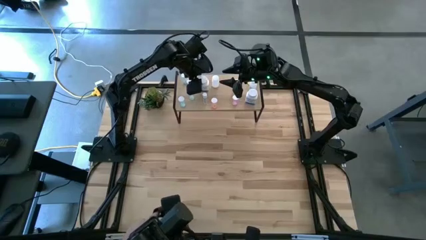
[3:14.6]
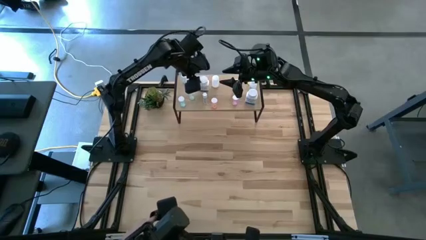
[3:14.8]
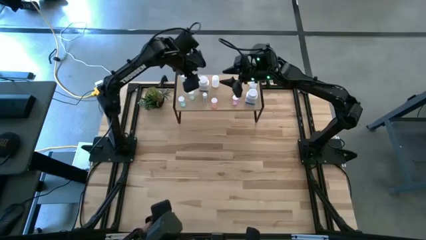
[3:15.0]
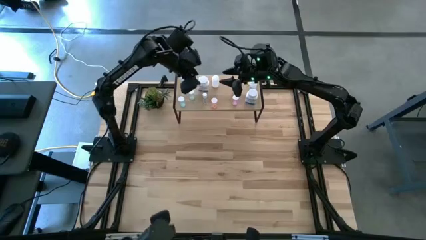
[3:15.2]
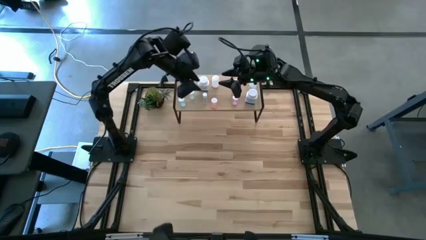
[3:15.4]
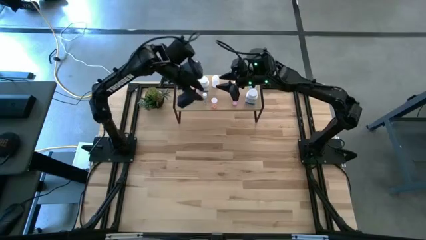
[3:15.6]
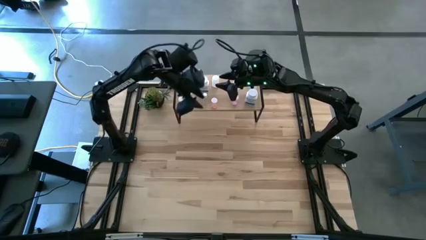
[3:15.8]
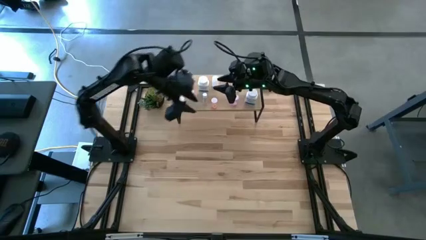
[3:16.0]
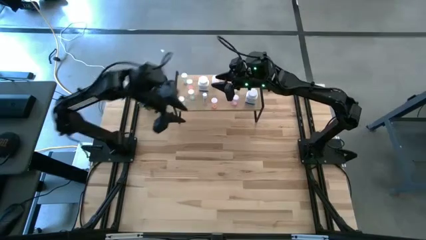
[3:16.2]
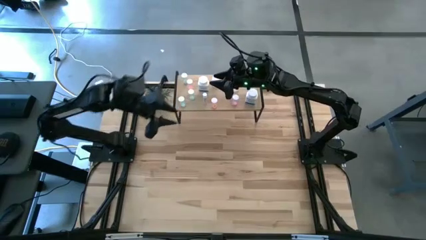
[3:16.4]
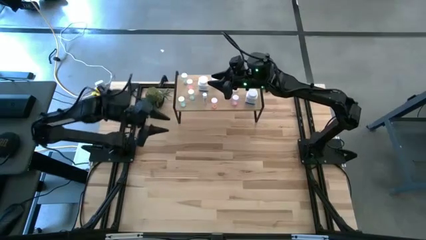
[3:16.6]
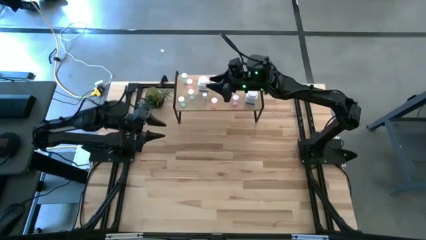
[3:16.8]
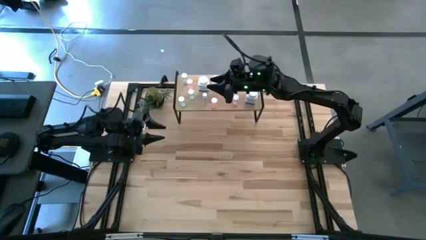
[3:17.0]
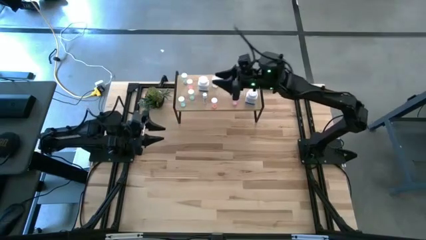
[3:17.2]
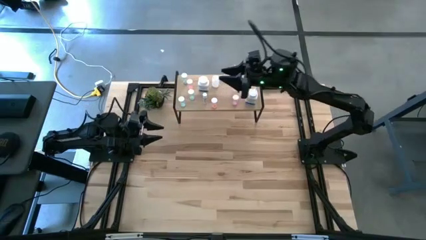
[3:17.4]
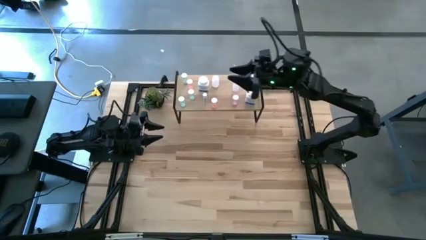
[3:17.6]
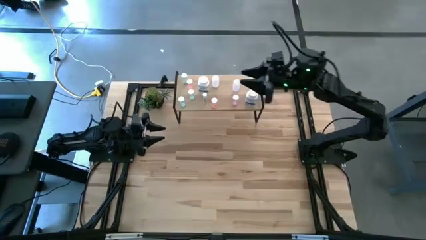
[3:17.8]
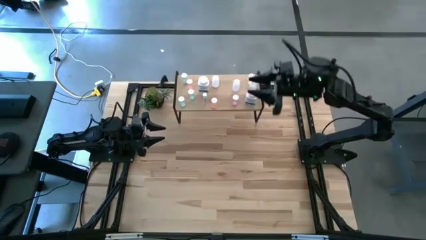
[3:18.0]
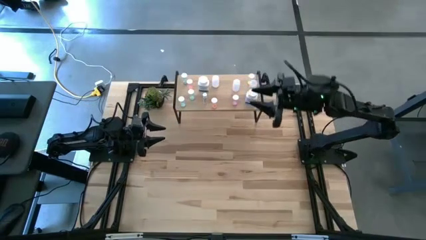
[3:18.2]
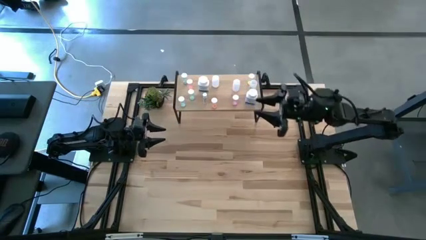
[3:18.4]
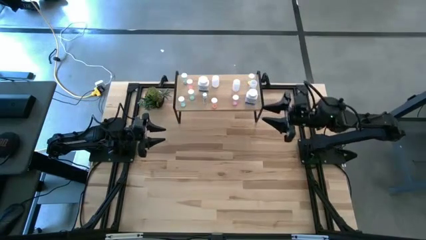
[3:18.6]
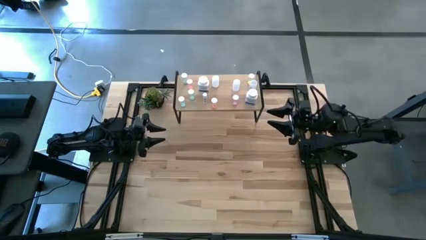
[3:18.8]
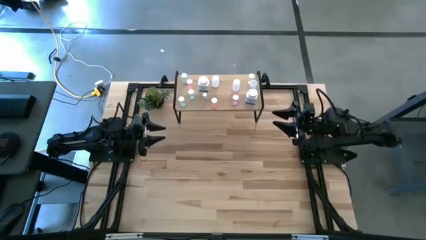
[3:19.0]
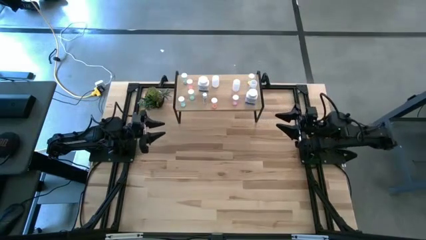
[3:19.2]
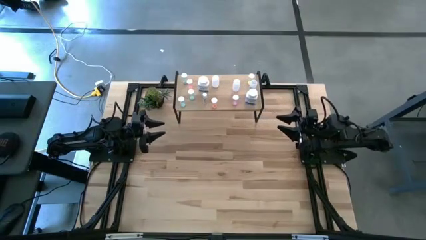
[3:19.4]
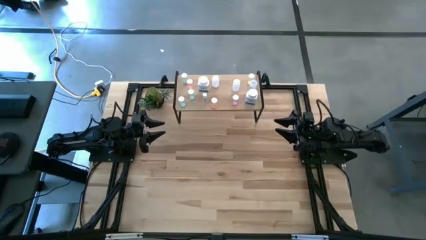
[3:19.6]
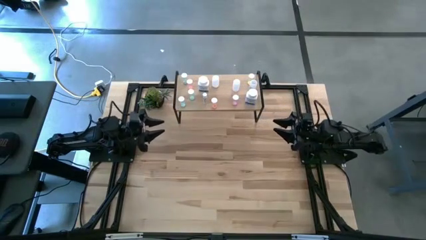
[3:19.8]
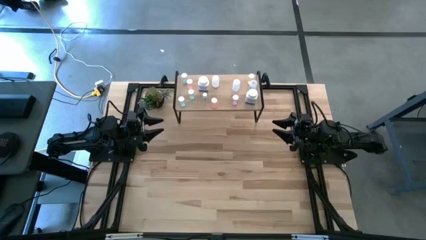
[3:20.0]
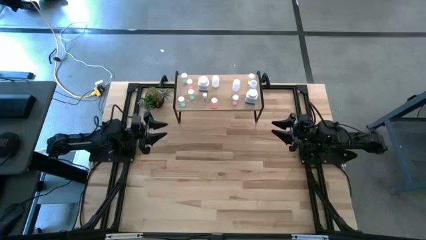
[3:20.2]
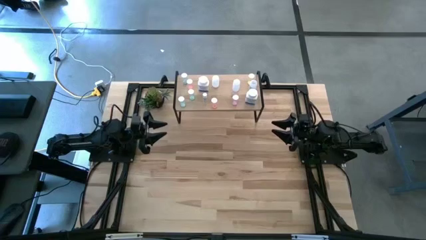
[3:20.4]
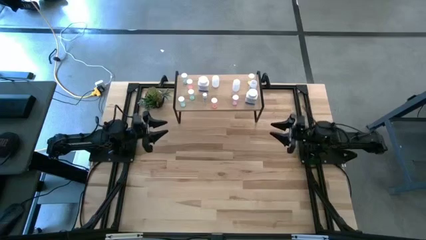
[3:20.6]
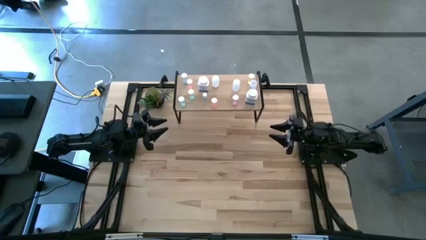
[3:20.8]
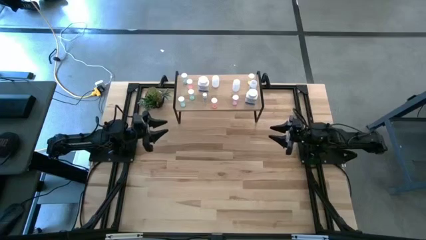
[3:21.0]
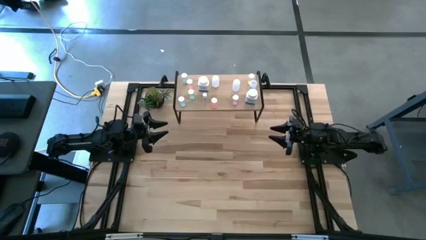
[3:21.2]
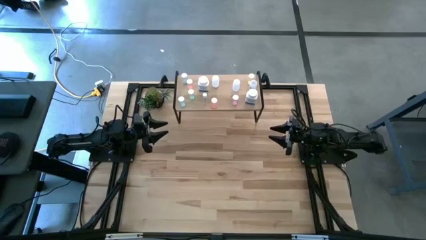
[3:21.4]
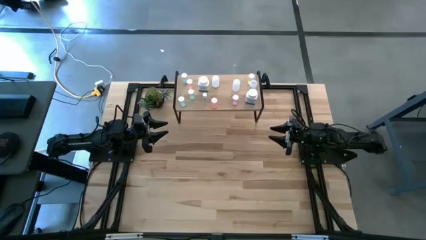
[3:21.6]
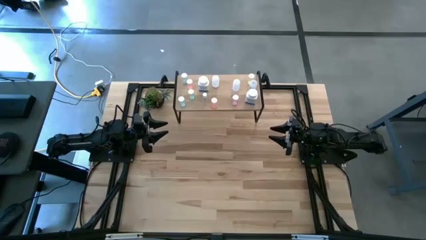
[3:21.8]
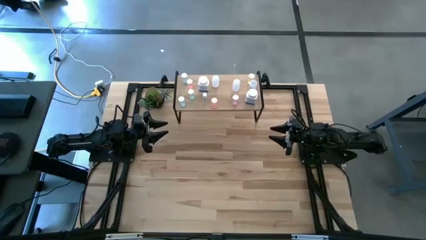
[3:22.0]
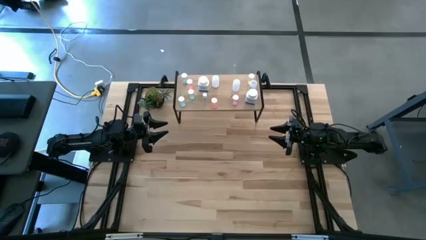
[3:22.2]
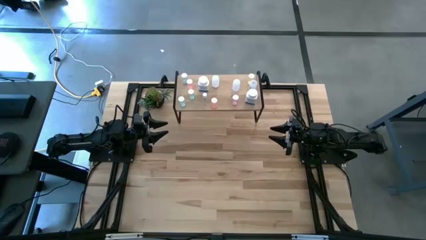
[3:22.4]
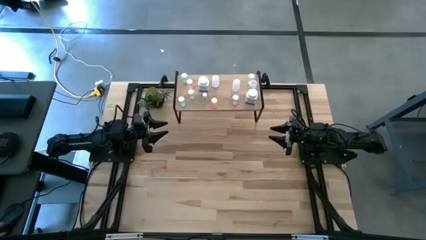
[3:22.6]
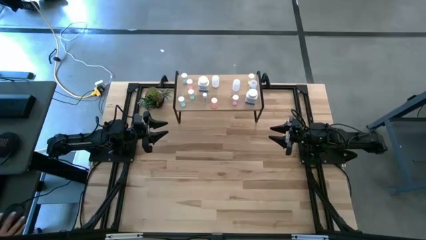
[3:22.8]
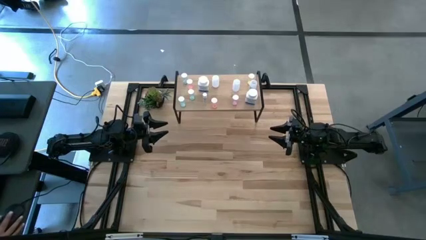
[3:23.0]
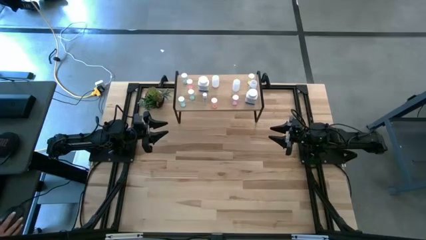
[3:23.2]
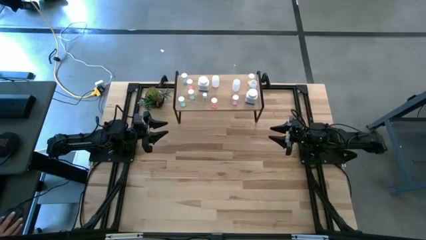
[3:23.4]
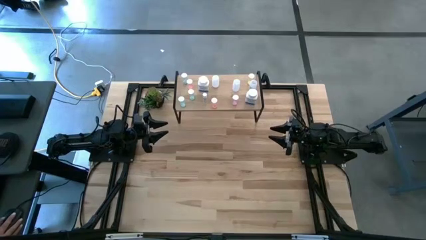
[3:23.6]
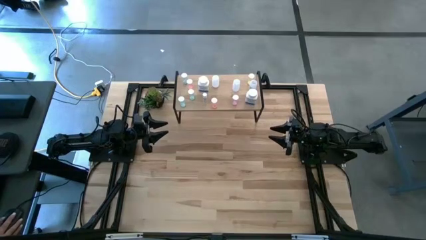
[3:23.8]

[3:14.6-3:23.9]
Task: Pick and place medicine bottles onto shelf by color
Return to Home Position

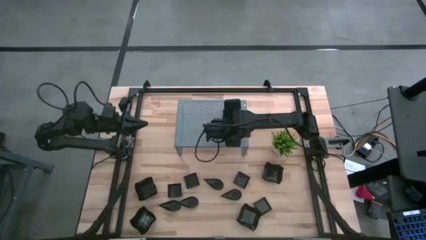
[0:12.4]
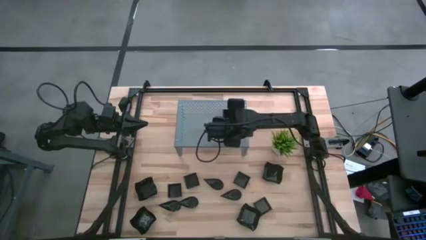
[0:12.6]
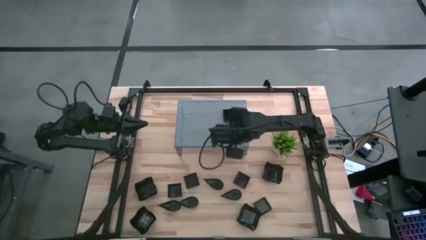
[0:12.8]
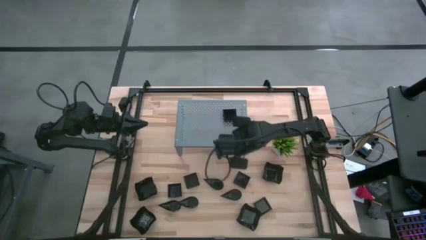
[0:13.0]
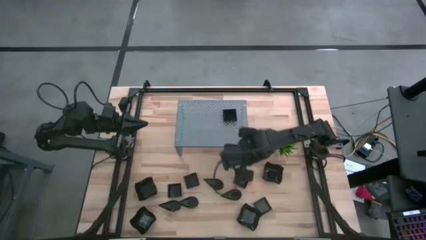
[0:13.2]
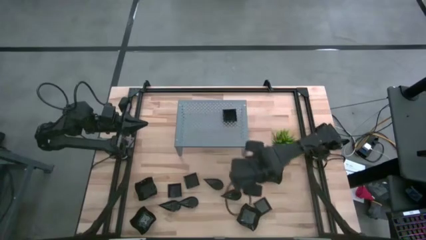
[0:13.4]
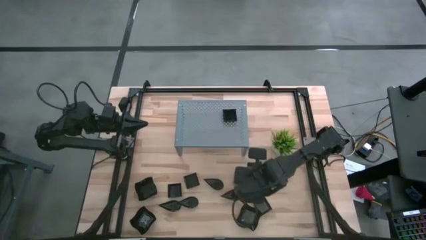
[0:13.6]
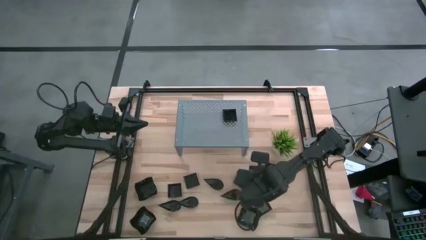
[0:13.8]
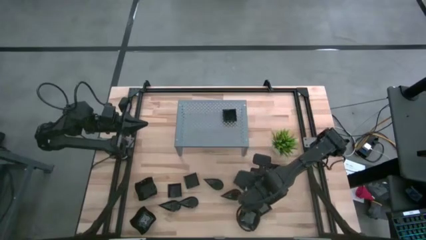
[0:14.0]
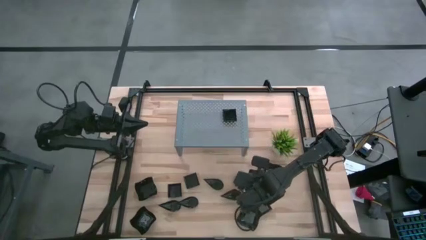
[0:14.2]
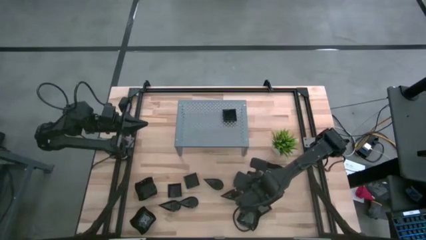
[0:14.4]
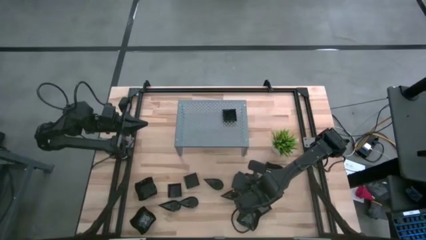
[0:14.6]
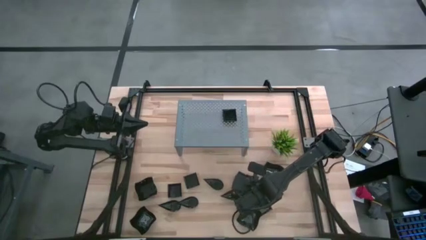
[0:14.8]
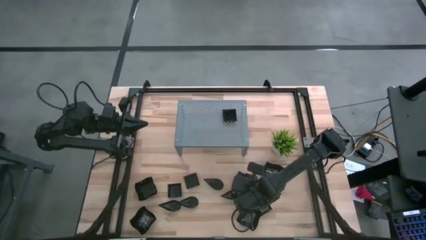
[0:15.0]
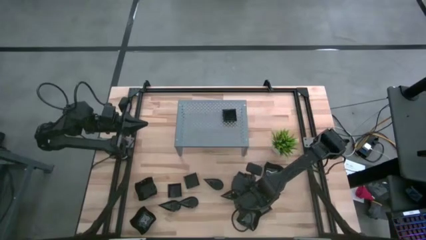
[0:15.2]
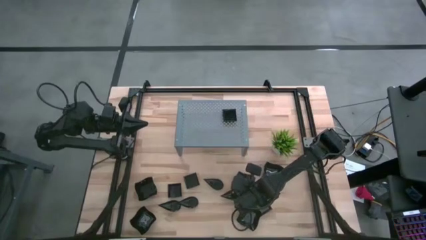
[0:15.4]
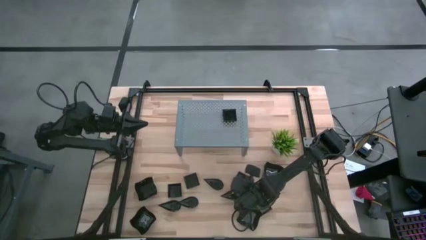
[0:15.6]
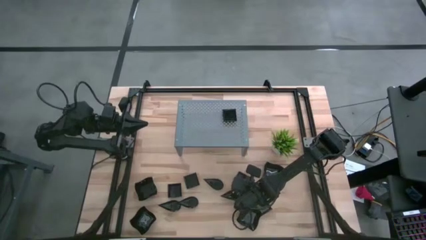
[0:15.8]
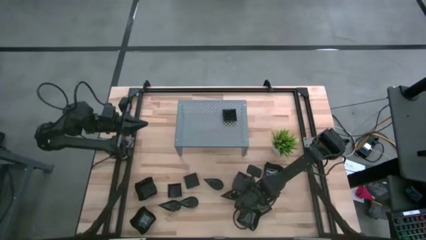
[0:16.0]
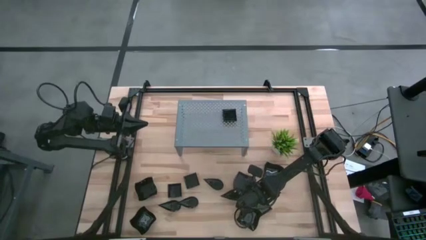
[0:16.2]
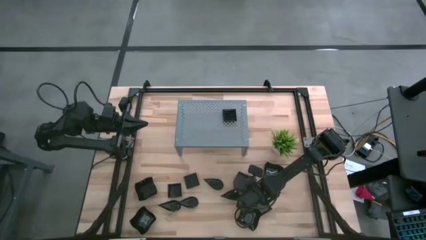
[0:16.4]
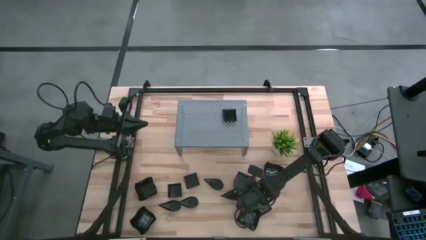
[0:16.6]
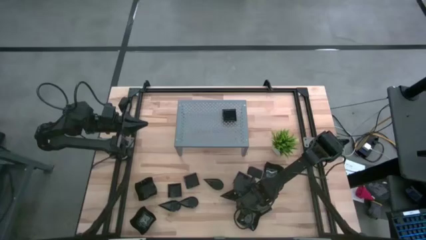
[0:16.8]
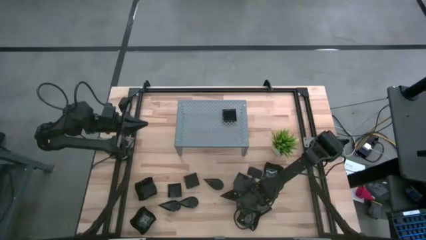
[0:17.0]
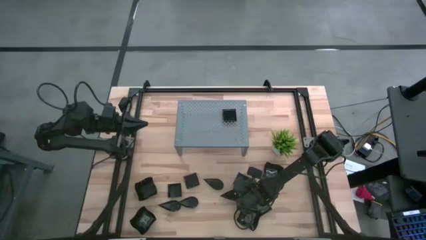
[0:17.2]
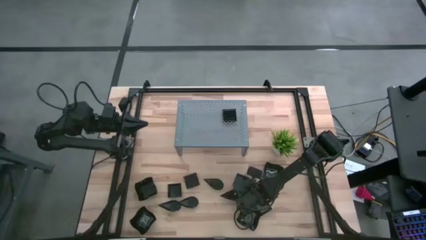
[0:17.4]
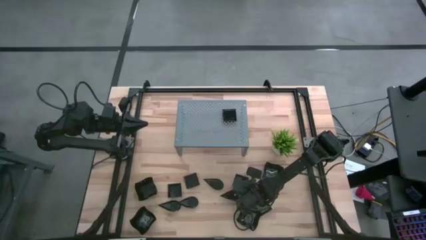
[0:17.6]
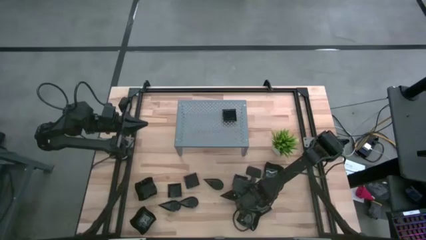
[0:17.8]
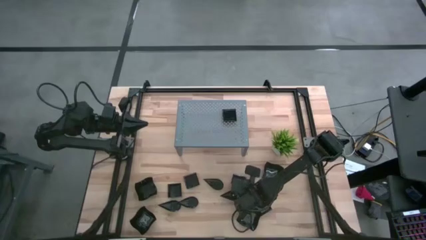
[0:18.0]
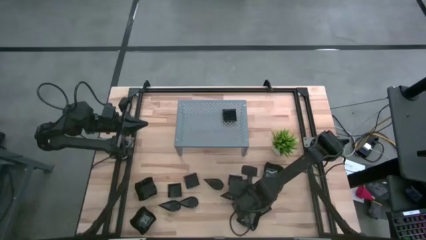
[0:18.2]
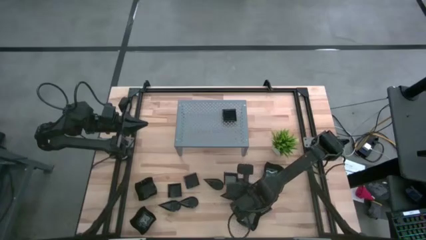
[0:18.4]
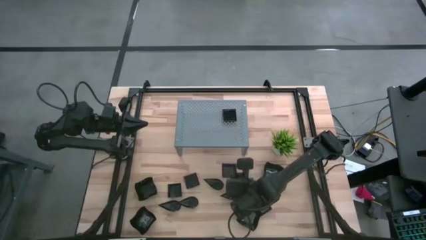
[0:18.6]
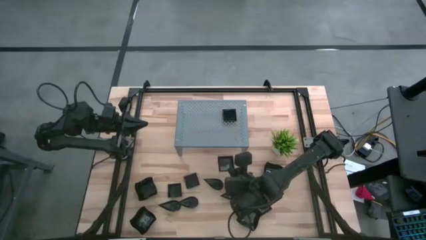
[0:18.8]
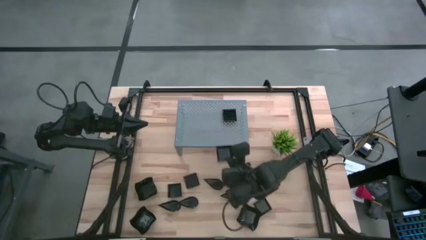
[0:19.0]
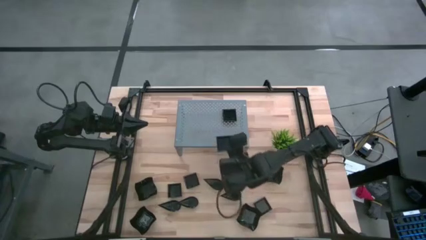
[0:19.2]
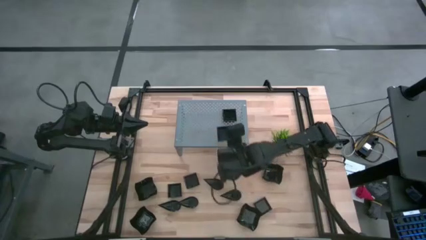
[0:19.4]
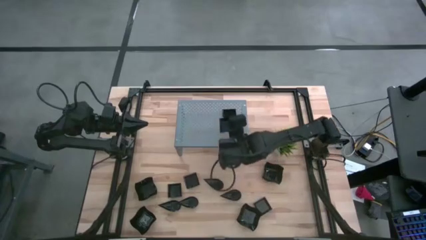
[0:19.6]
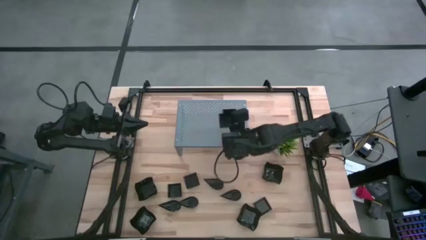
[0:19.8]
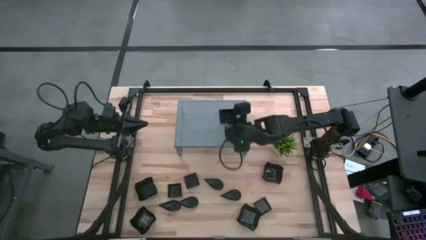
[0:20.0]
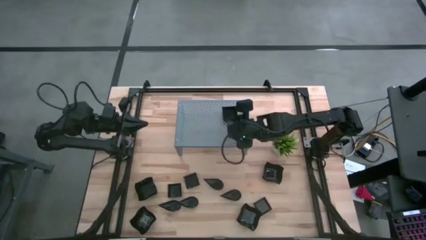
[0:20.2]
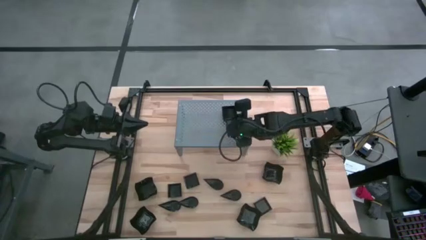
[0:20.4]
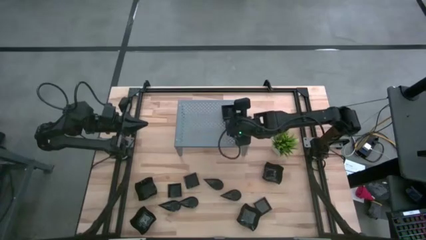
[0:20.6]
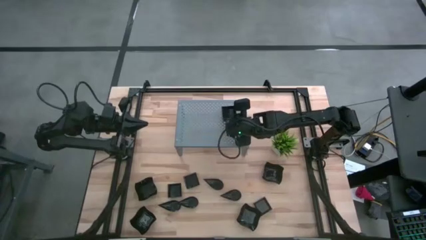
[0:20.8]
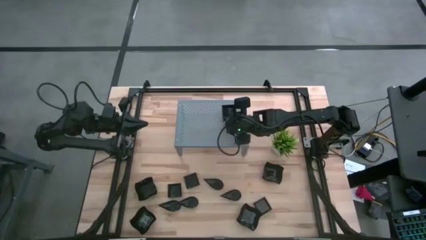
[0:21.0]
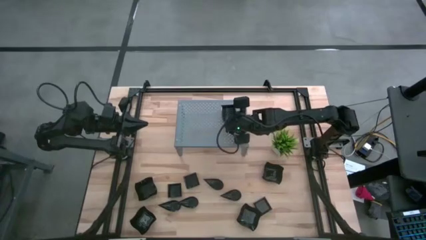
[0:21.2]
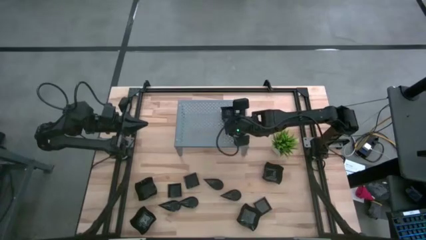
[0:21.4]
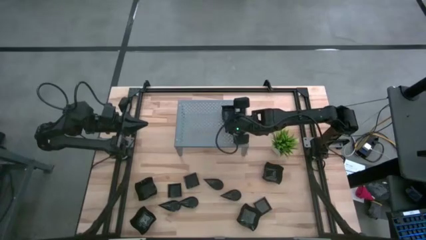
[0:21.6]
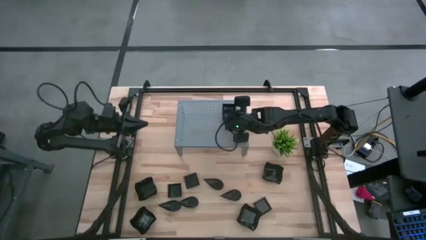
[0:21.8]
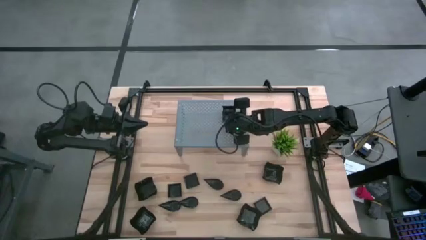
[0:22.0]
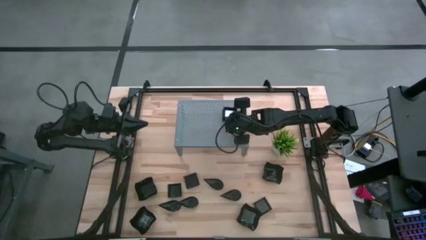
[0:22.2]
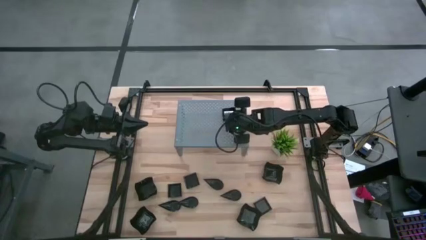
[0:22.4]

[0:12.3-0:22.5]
Task: Pick & Place Mini shaped plates
Stack the square plate on top of the square plate on the shelf
